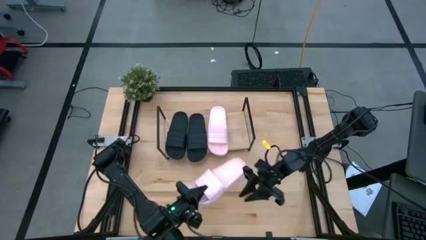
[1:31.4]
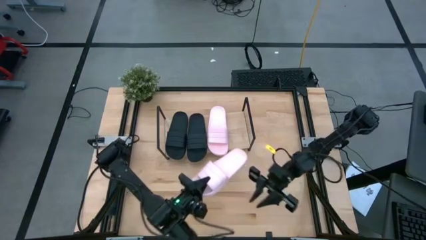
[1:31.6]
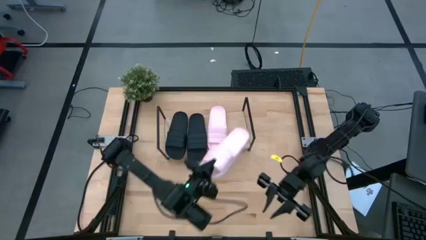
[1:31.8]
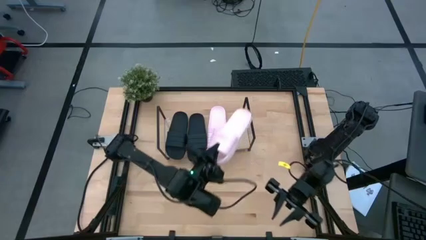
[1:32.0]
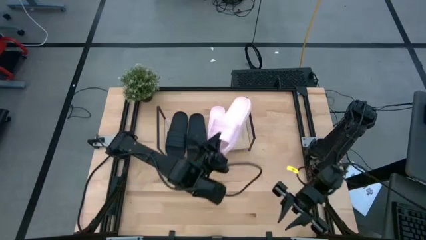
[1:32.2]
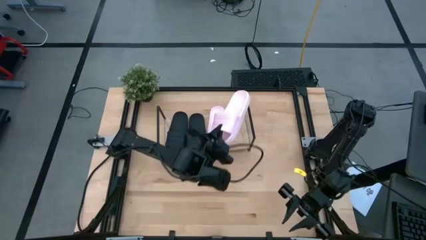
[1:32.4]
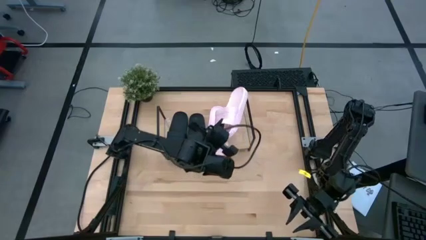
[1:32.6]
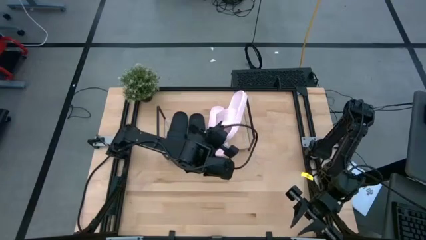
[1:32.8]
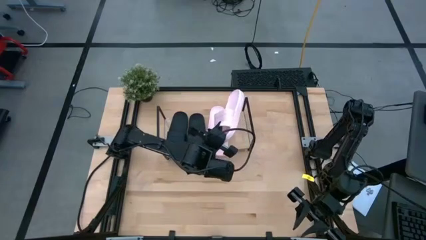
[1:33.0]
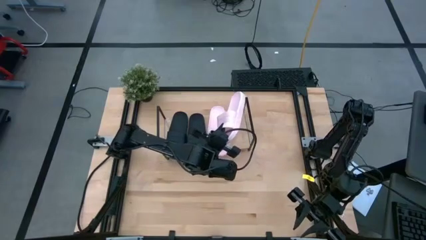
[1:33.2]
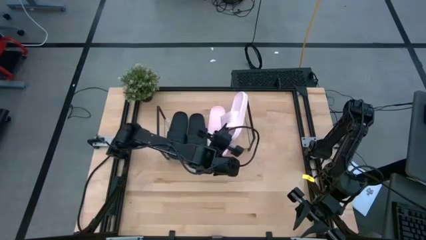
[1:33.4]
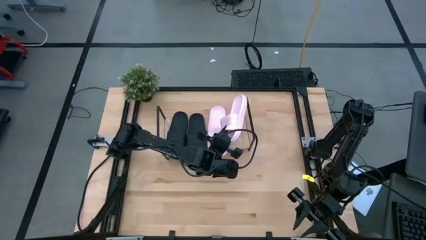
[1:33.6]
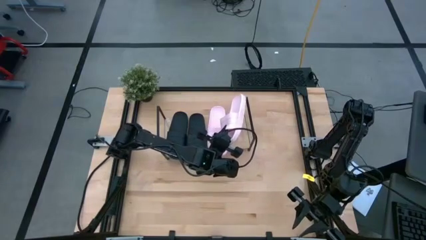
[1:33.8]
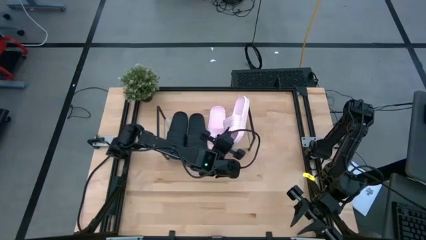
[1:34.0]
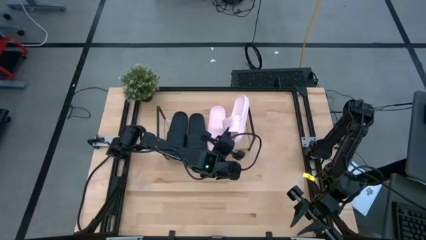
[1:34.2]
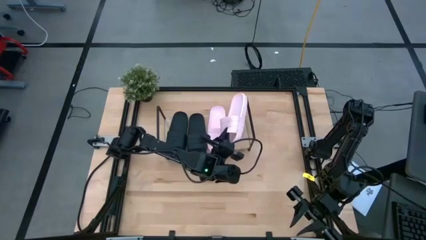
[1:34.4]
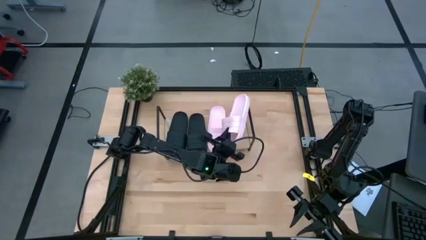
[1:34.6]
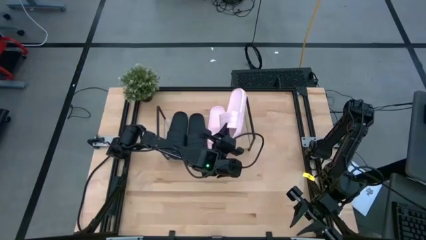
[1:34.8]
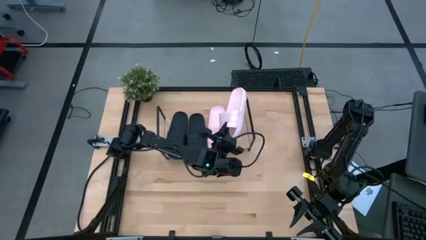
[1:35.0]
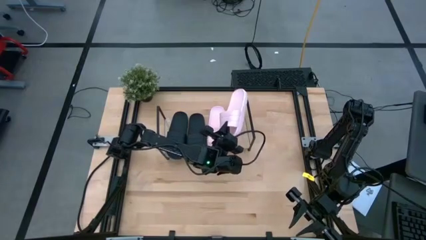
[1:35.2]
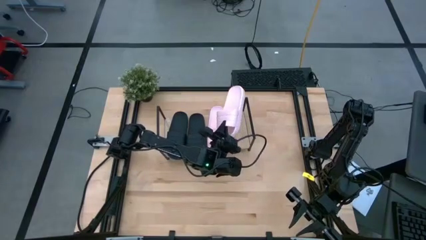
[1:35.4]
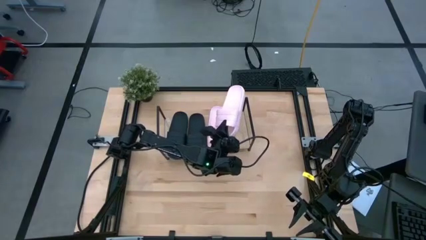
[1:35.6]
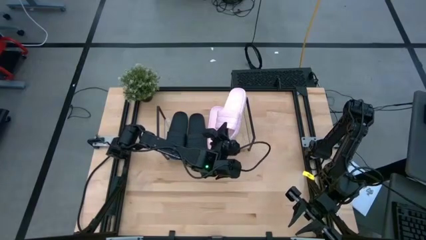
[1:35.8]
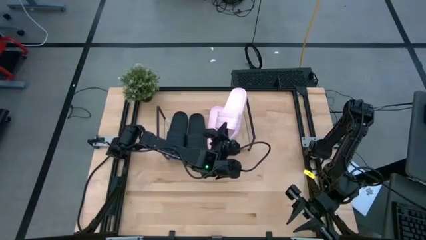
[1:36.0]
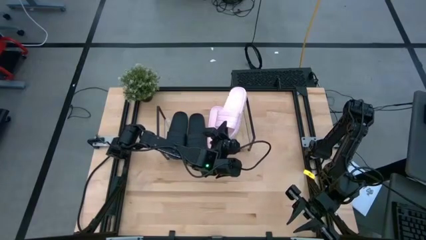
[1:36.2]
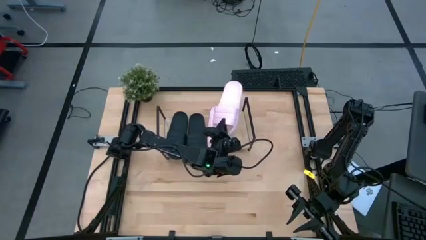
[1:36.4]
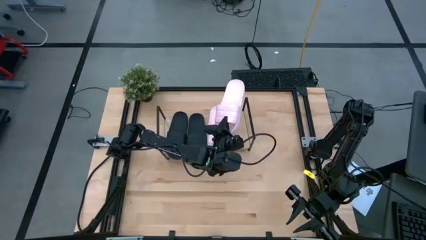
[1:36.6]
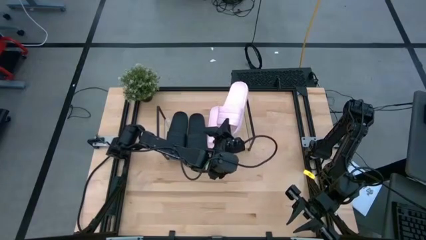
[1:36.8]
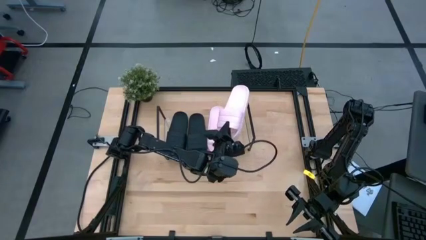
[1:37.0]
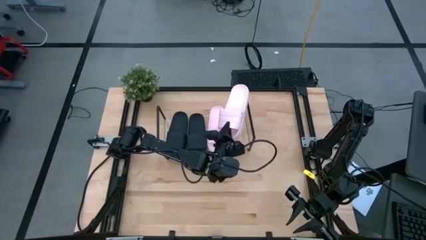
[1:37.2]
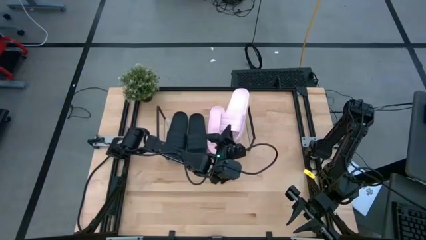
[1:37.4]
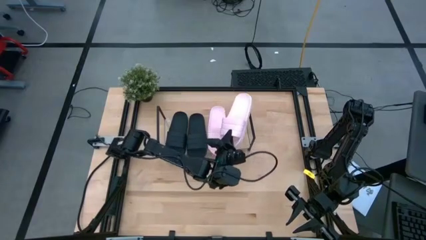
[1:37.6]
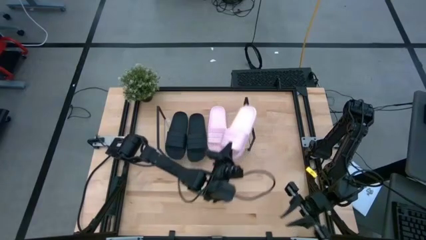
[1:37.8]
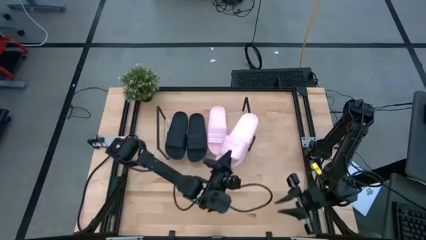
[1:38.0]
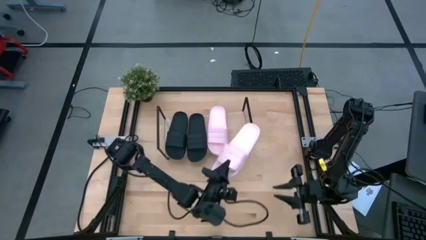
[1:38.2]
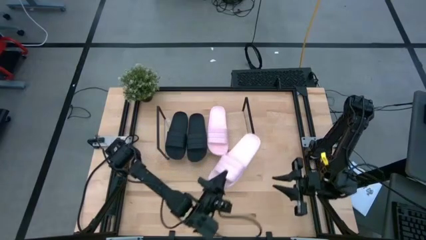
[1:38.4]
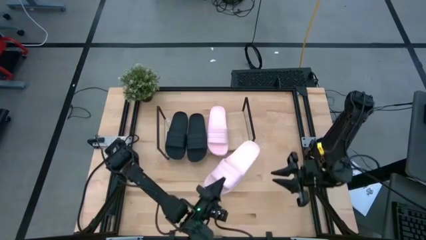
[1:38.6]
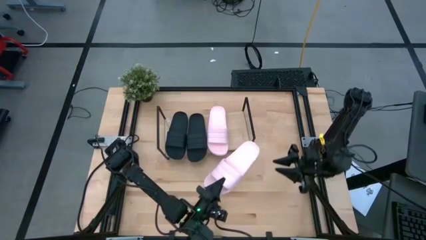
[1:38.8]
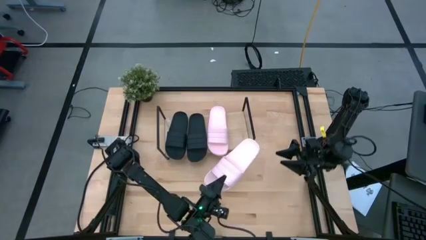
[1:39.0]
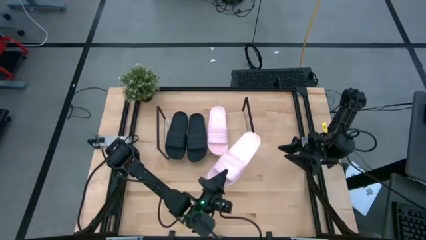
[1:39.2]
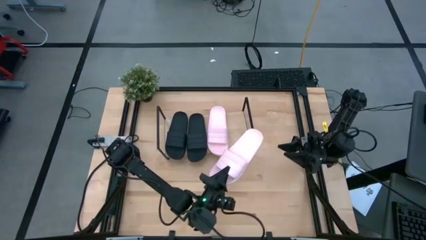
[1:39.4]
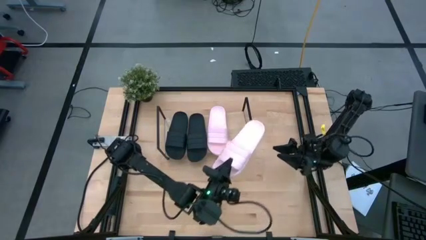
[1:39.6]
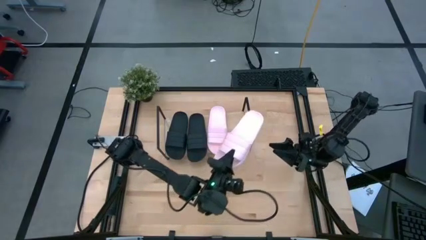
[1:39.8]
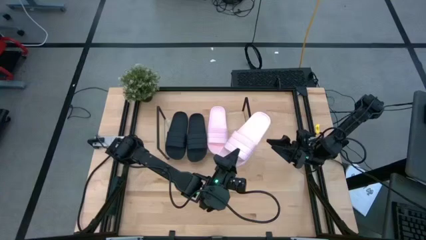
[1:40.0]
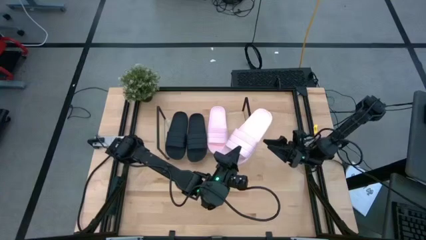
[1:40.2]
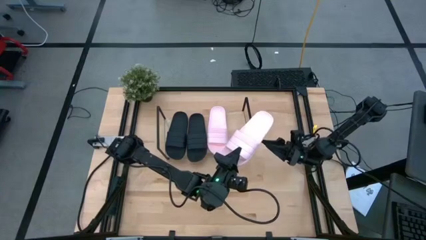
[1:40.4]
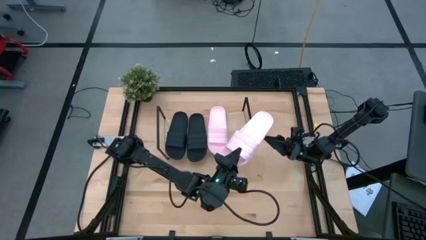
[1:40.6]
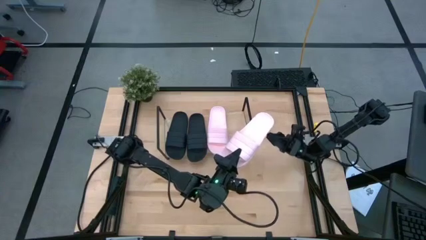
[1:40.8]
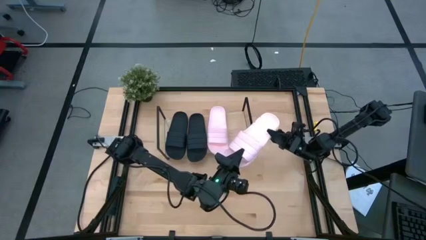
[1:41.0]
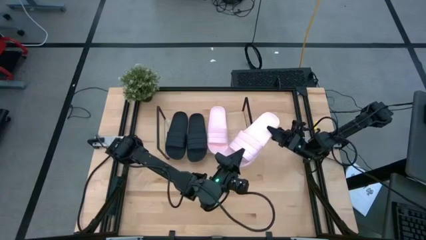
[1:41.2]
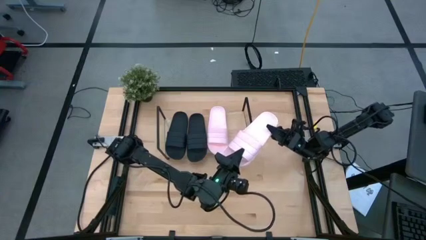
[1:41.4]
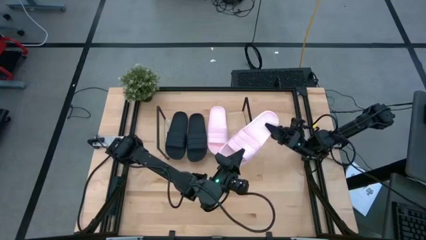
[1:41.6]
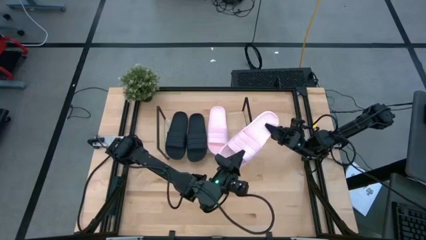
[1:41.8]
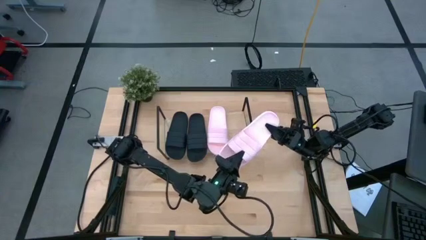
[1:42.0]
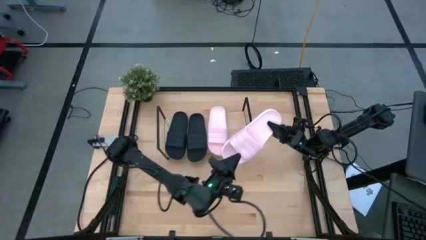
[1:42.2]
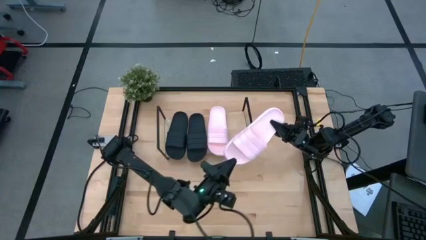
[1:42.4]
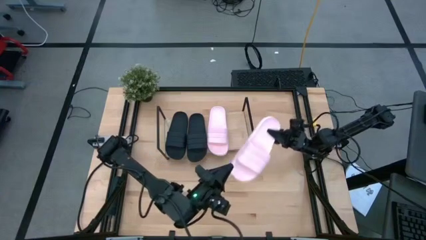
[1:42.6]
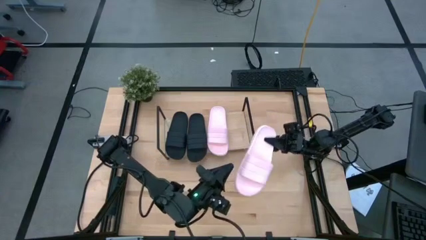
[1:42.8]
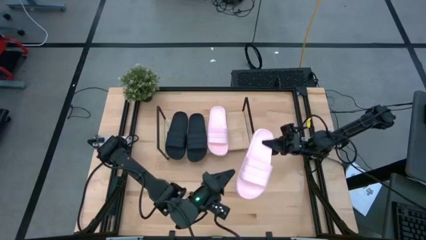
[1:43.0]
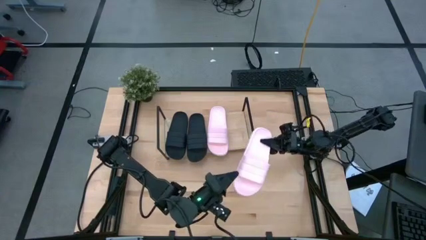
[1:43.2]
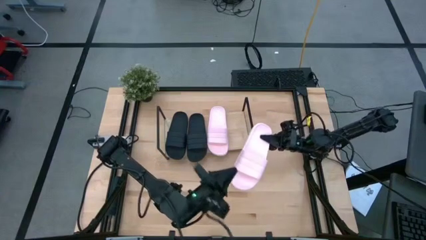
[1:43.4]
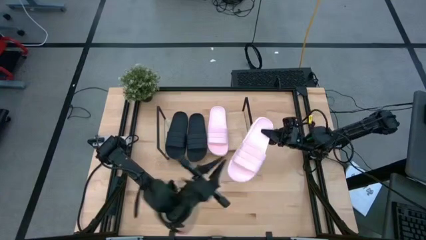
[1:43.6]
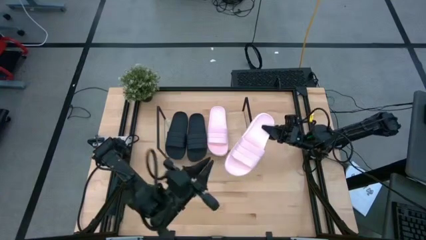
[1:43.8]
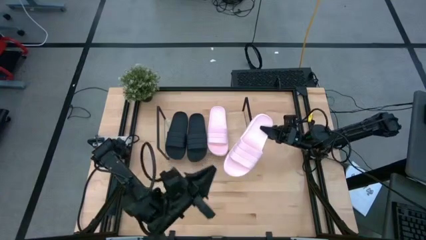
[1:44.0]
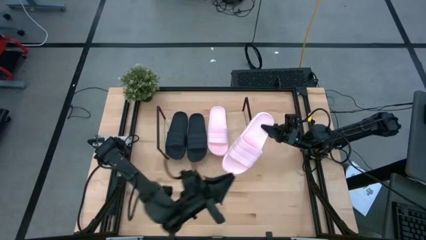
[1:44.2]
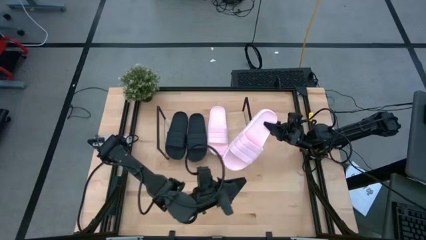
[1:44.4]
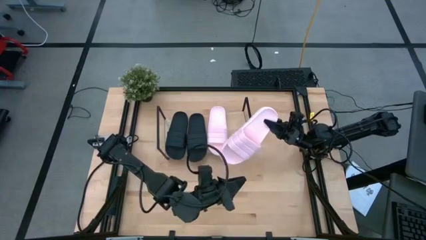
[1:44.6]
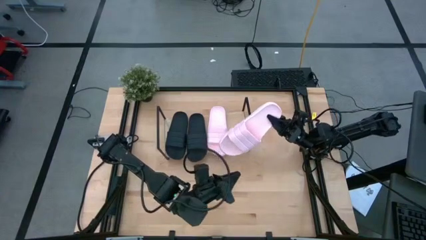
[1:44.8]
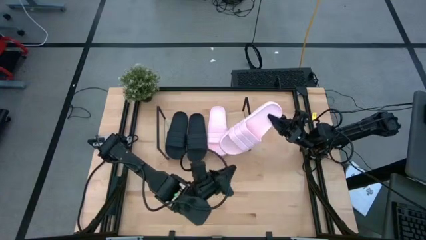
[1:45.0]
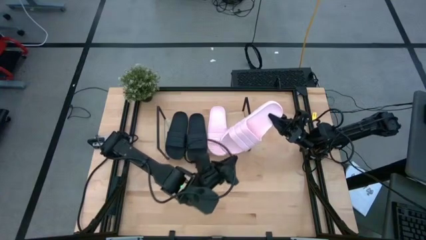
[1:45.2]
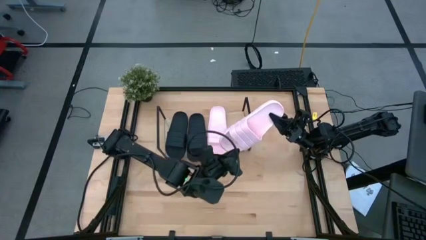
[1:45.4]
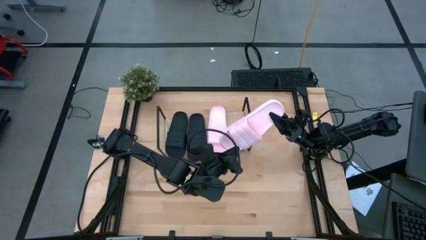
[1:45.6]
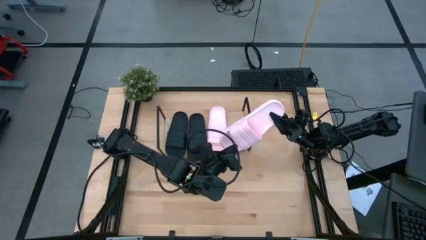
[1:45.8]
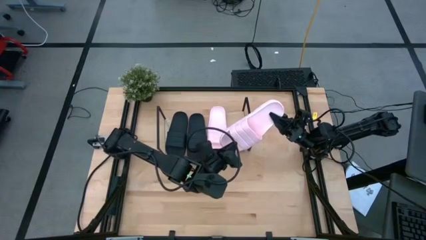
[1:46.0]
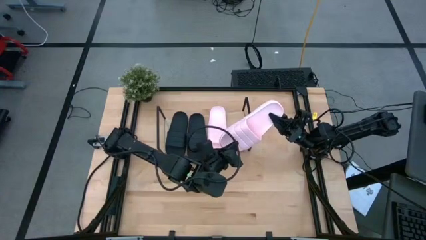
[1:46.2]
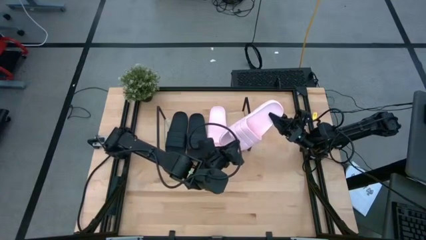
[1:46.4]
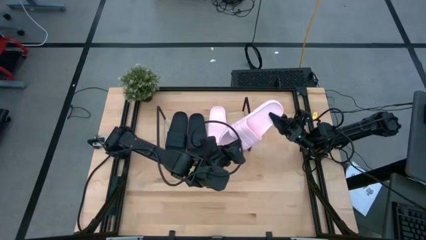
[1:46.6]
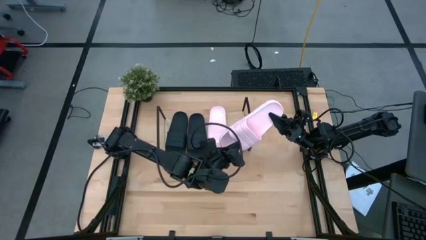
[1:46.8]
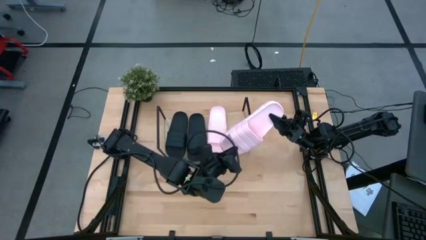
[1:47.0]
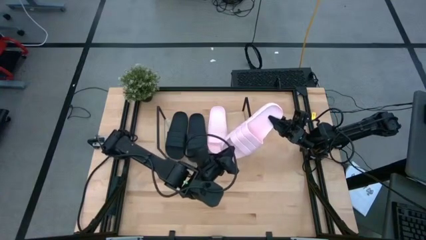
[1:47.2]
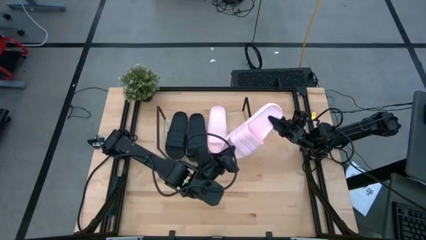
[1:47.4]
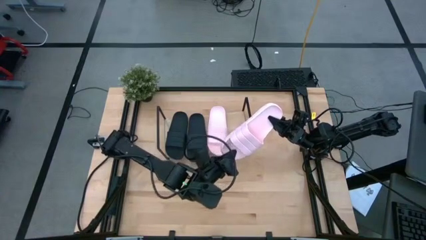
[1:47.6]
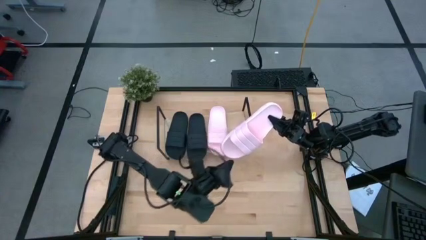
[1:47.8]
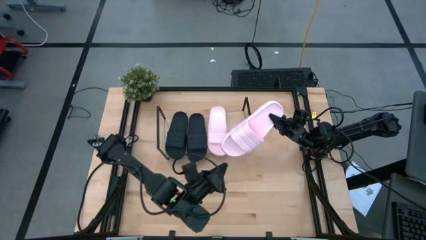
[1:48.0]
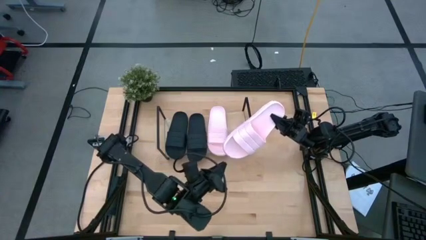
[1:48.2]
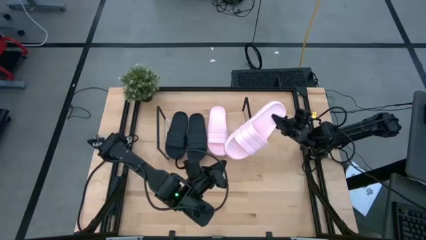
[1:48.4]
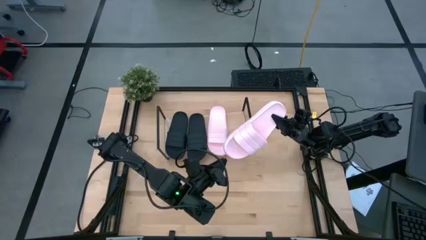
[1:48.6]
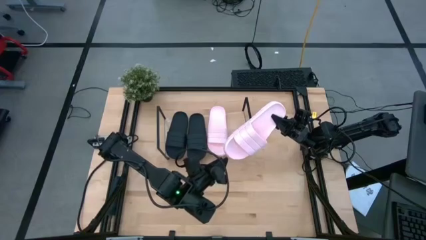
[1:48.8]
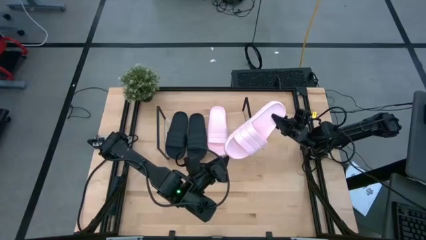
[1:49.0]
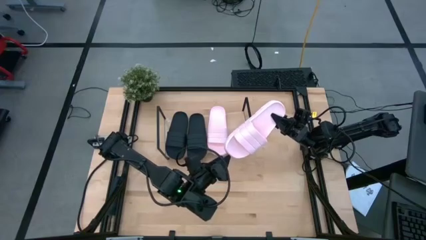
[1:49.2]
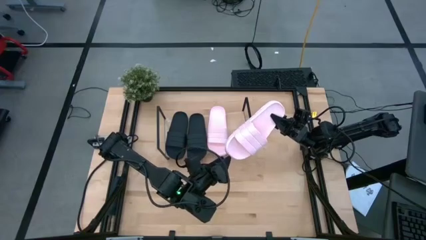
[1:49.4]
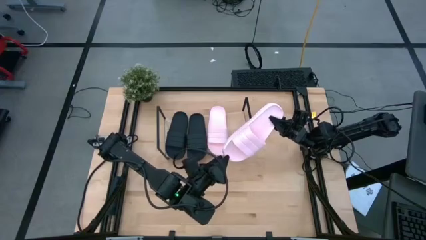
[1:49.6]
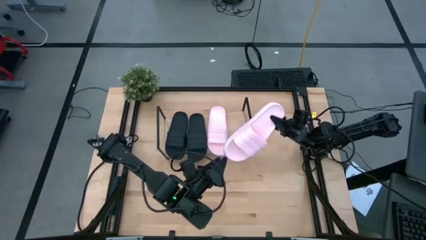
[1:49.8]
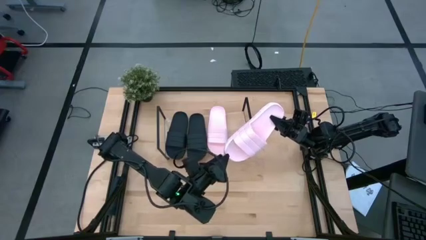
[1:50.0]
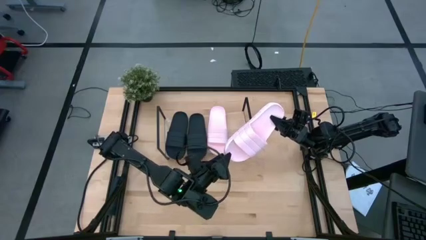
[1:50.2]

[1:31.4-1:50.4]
Task: Pick and place slides into the shelf
Put the pink pair of slide on the shelf
